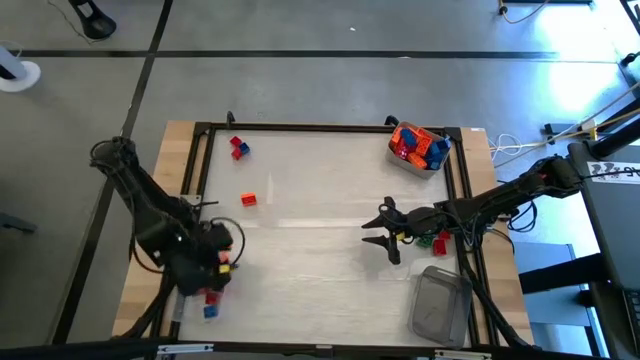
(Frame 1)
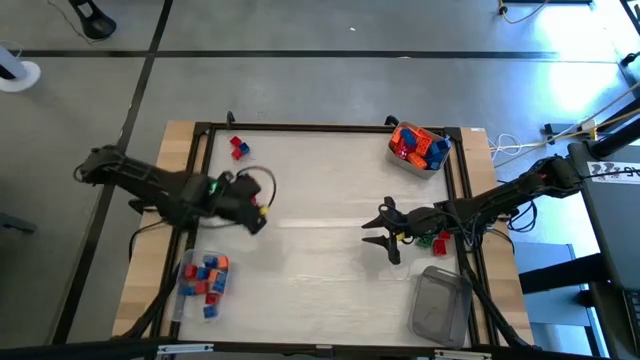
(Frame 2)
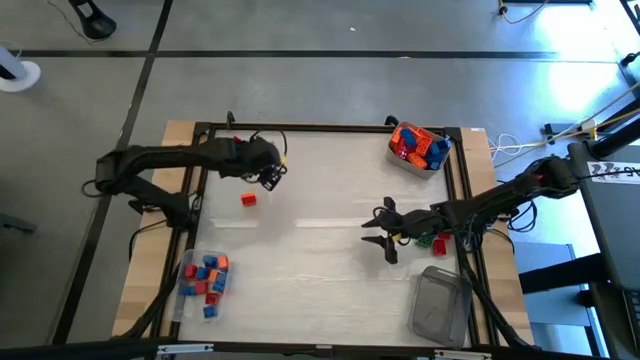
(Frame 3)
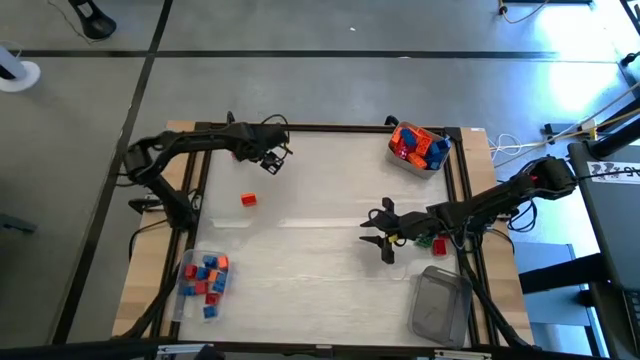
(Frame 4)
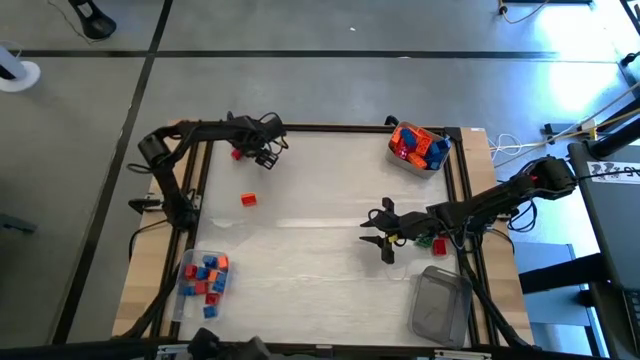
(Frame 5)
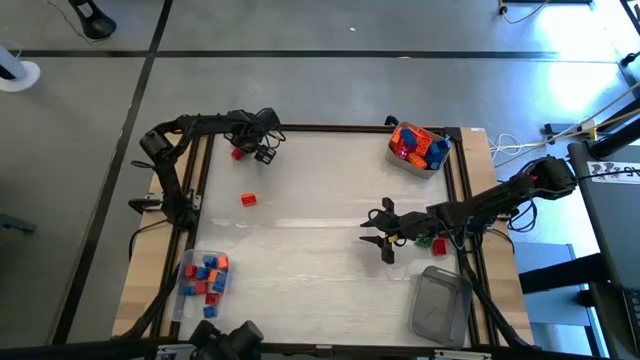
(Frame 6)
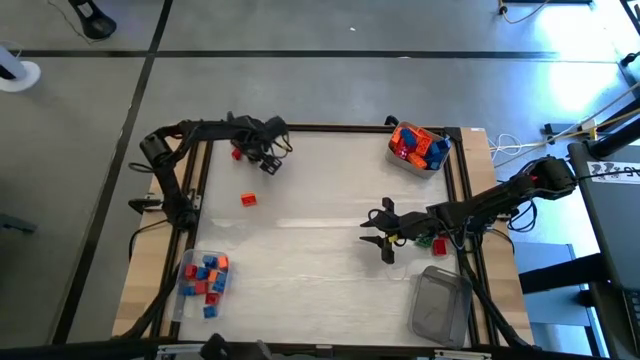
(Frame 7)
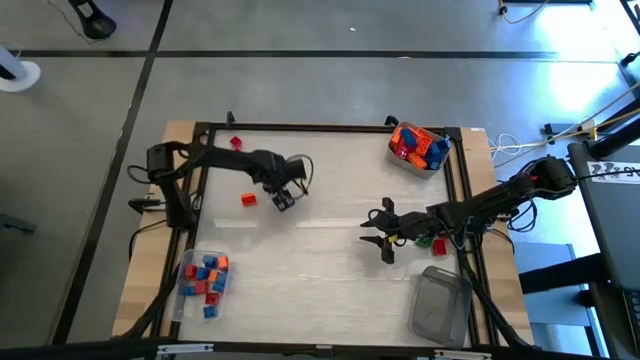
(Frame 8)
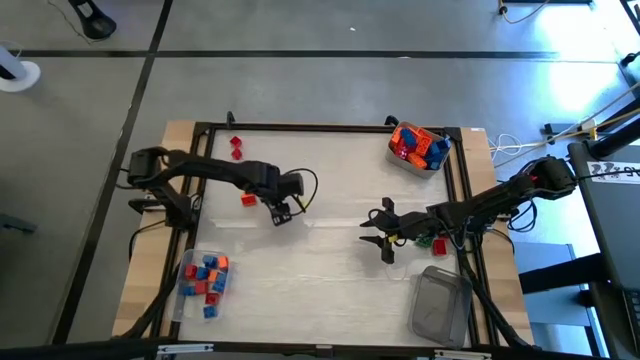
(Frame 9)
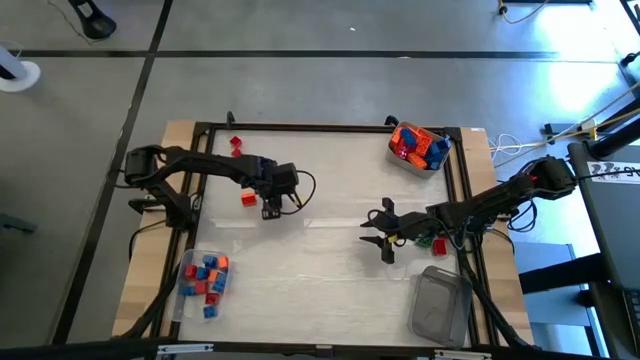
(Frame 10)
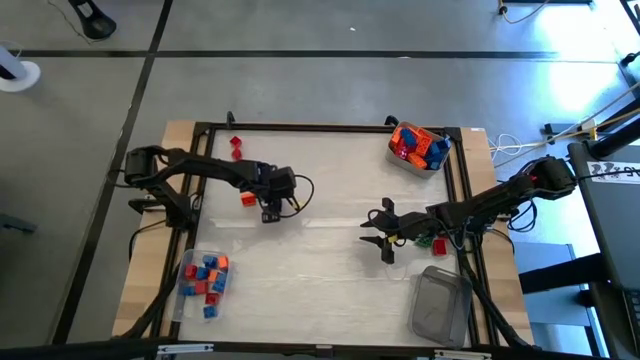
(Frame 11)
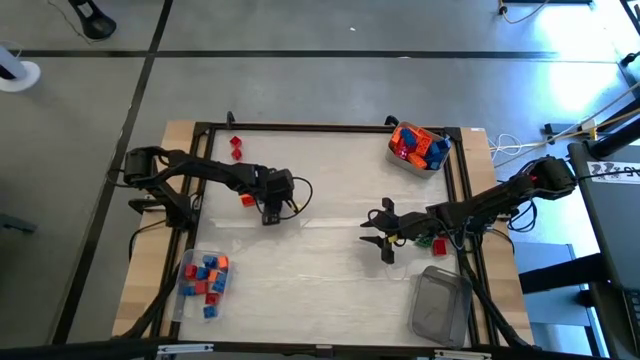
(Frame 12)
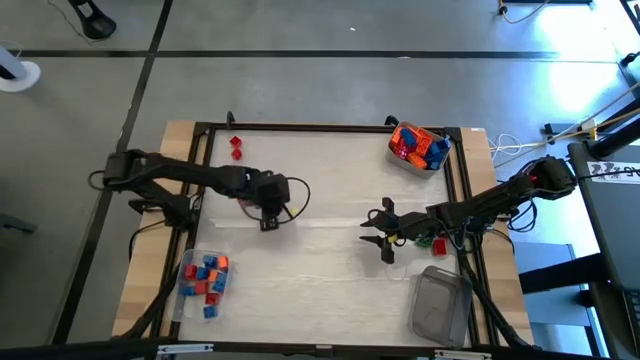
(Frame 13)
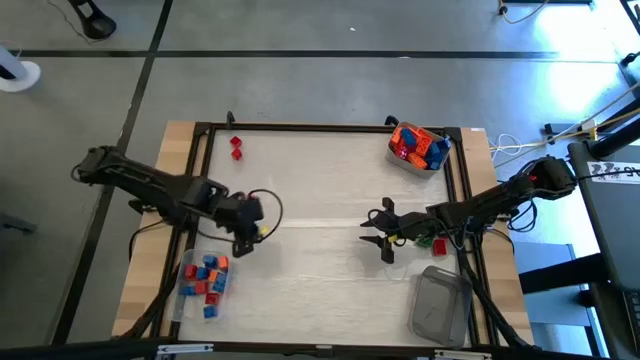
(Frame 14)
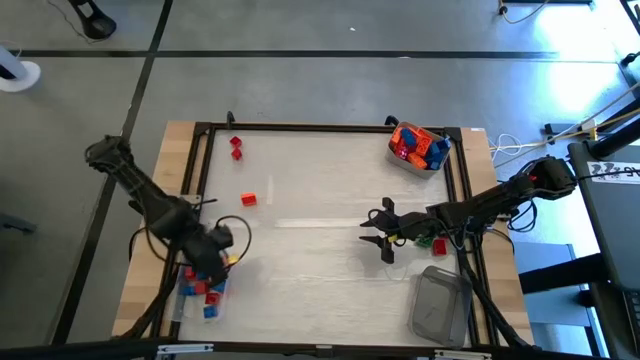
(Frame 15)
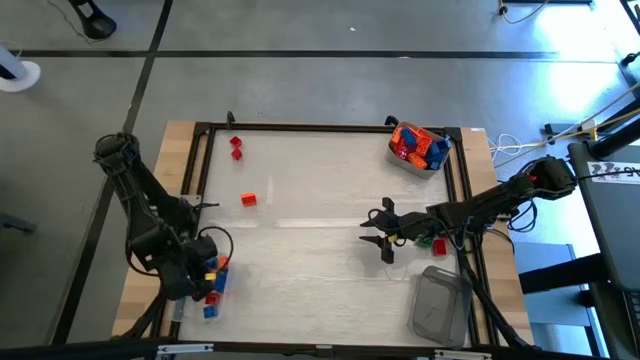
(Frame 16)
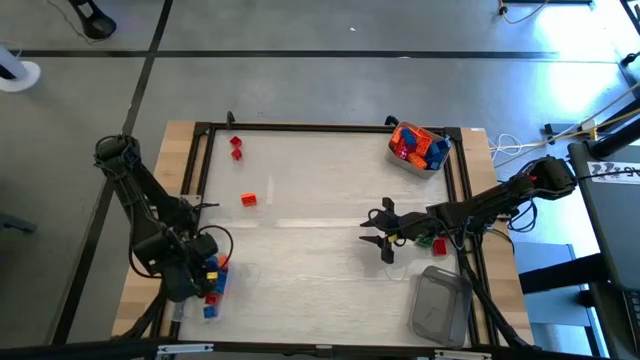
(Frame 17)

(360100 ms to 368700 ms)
Task: Sort blocks by size
Put the blue game piece into the transparent bin

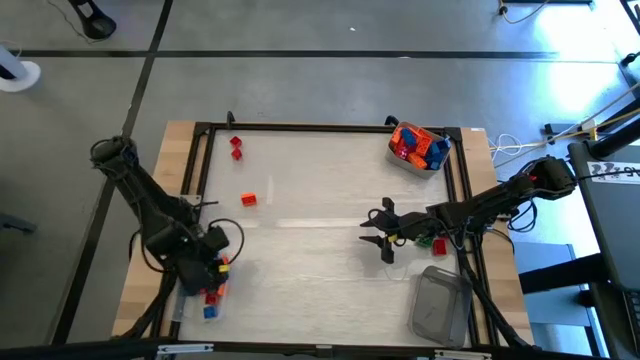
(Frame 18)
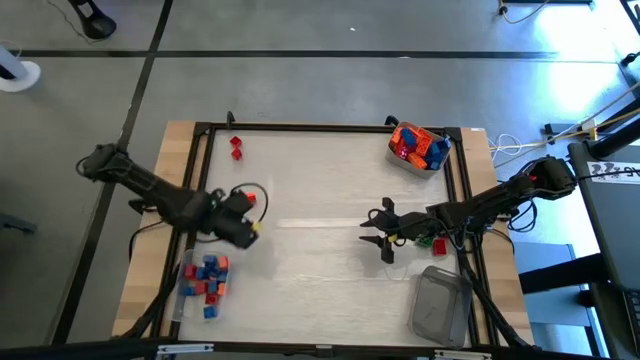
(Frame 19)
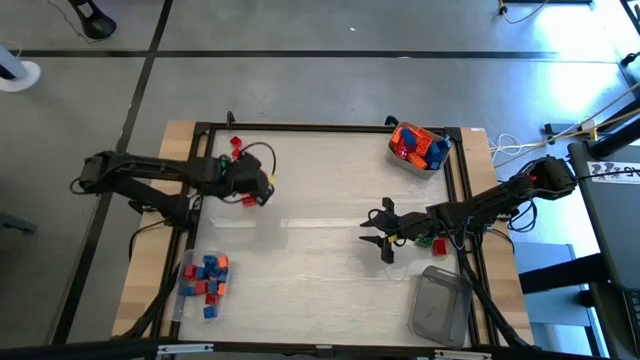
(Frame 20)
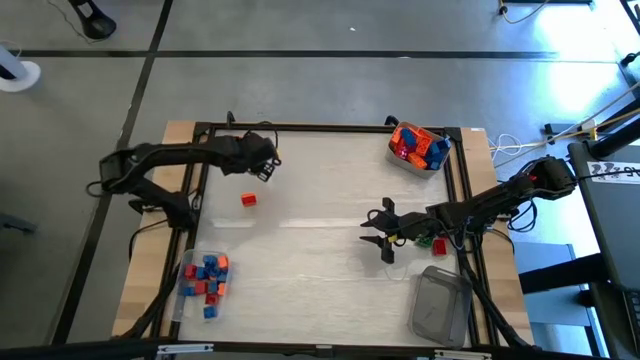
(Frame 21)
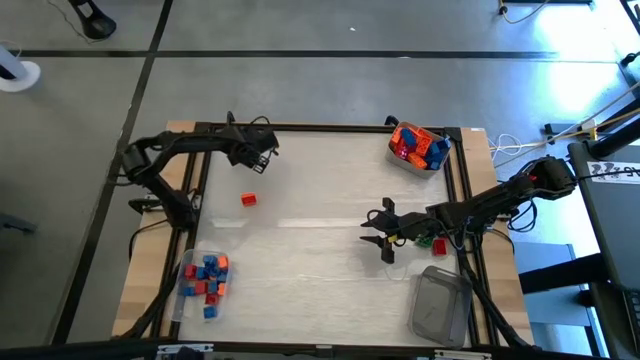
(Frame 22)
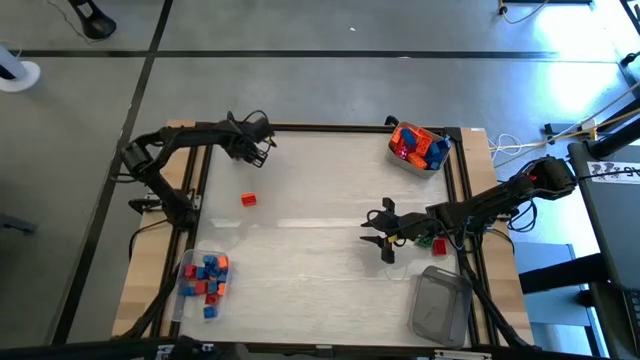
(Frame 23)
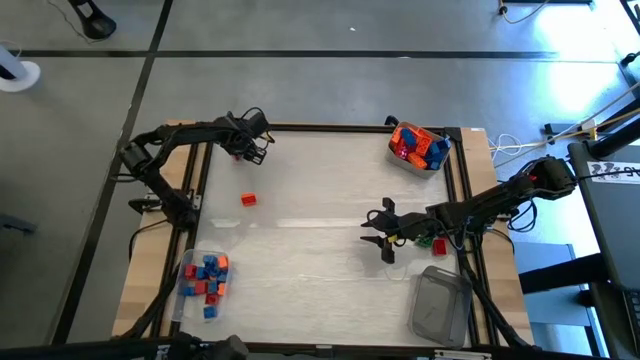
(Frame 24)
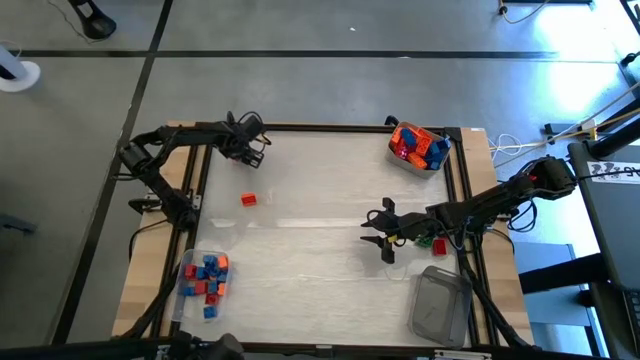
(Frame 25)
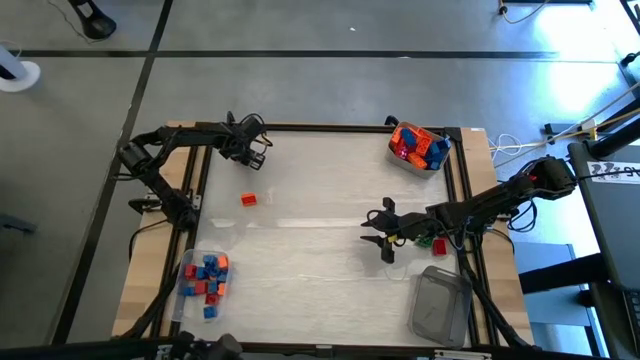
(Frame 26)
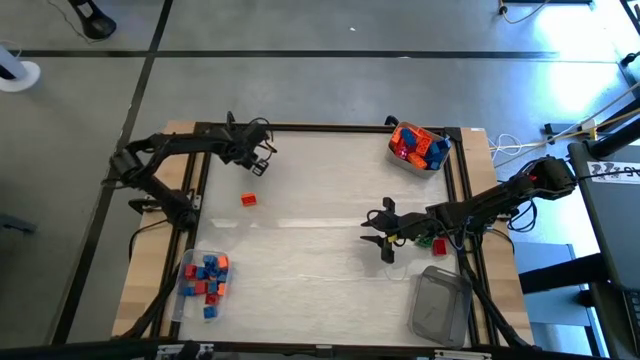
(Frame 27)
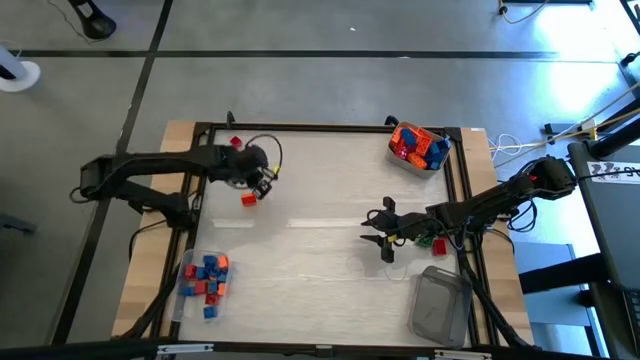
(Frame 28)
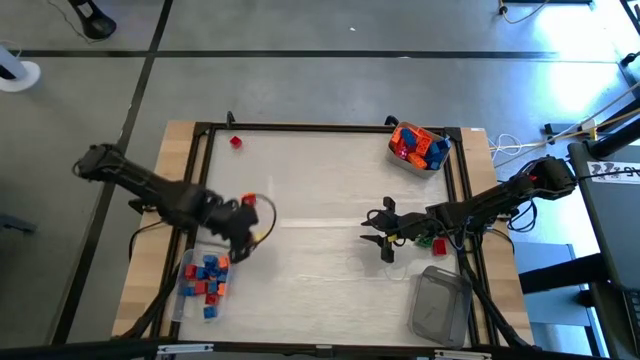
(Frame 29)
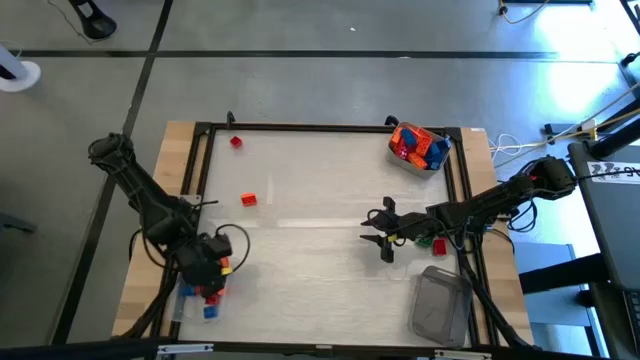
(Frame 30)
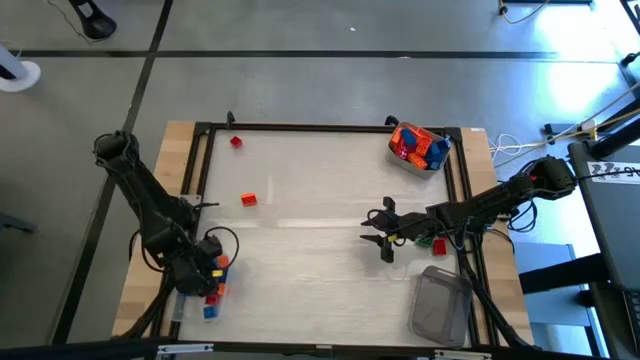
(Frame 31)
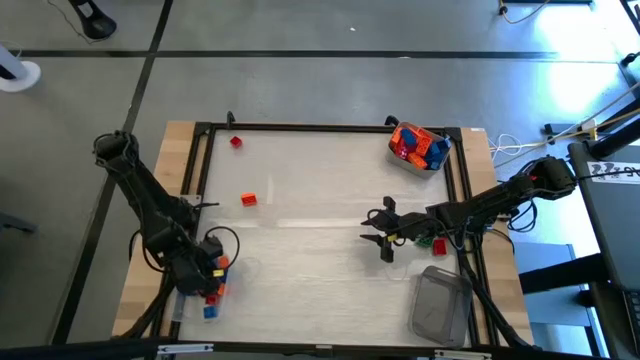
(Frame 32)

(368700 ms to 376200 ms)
Put the red game piece into the transparent bin

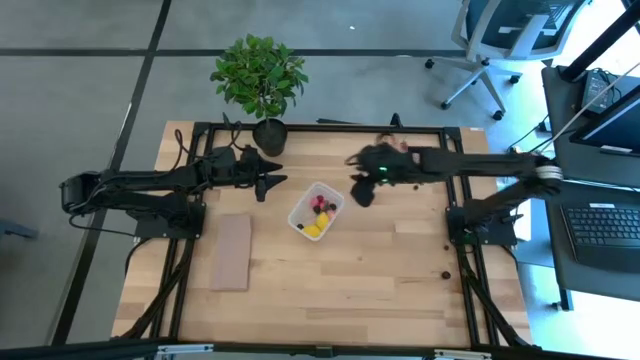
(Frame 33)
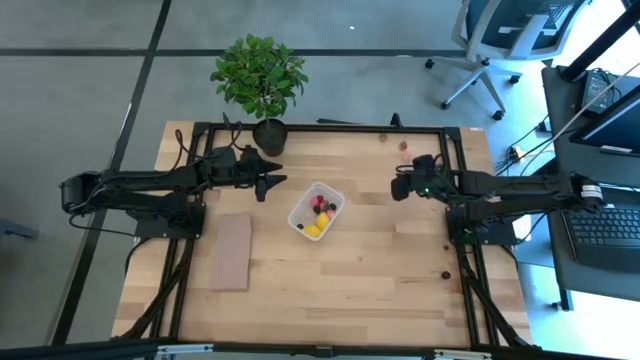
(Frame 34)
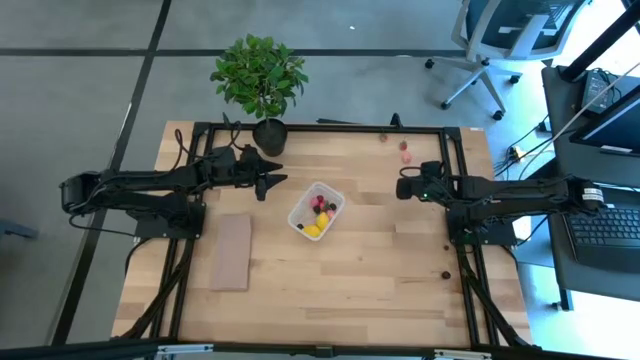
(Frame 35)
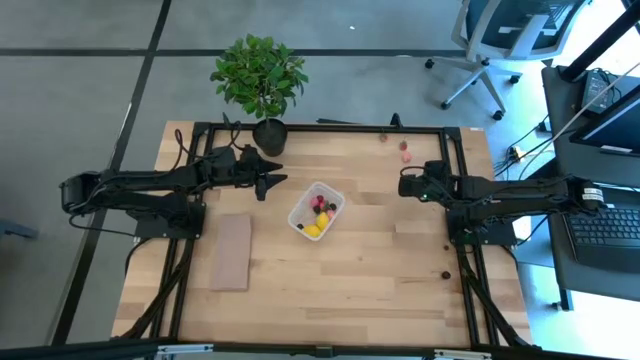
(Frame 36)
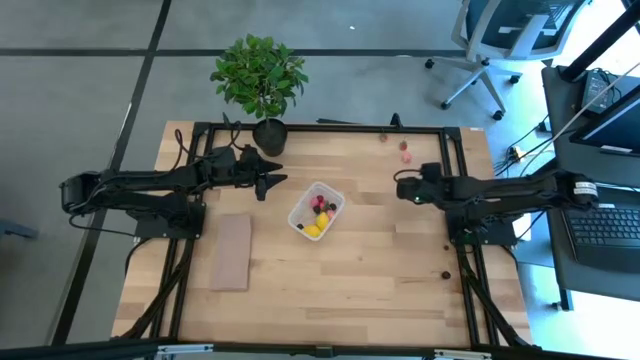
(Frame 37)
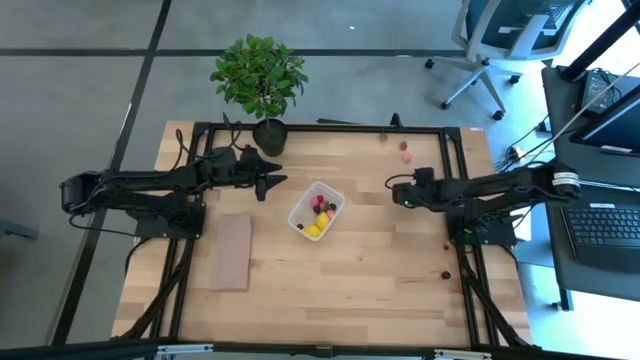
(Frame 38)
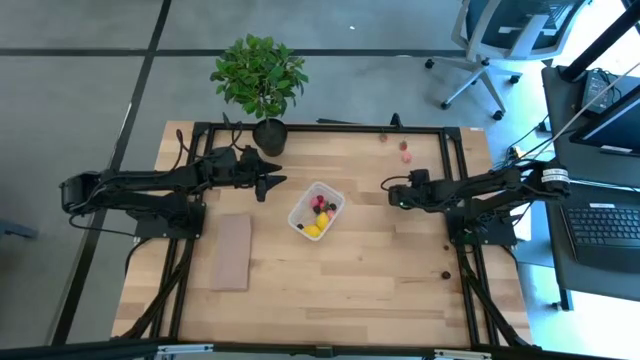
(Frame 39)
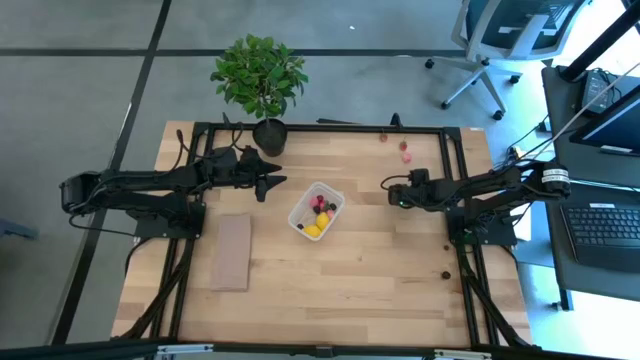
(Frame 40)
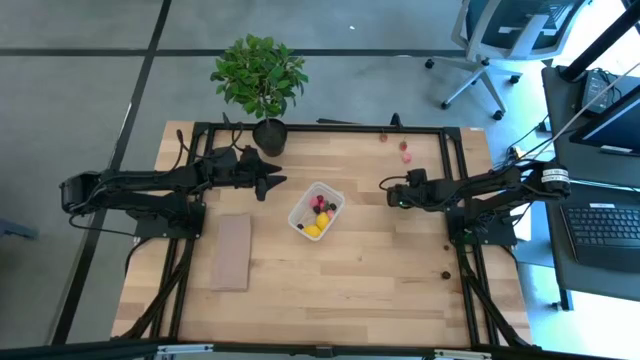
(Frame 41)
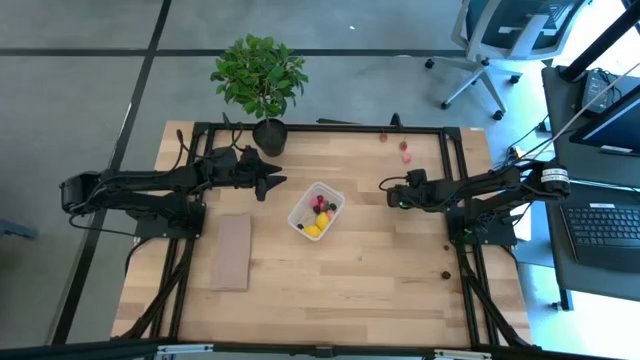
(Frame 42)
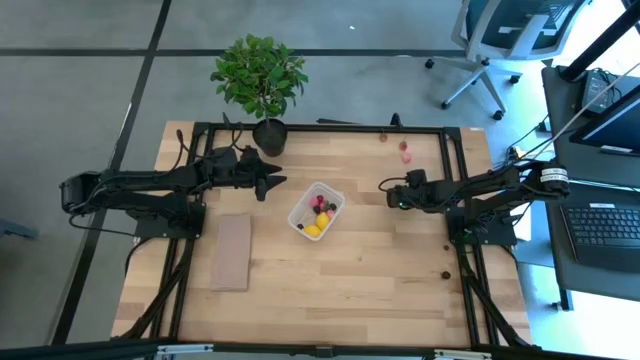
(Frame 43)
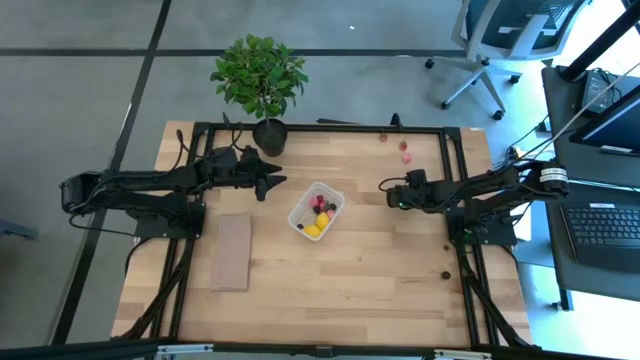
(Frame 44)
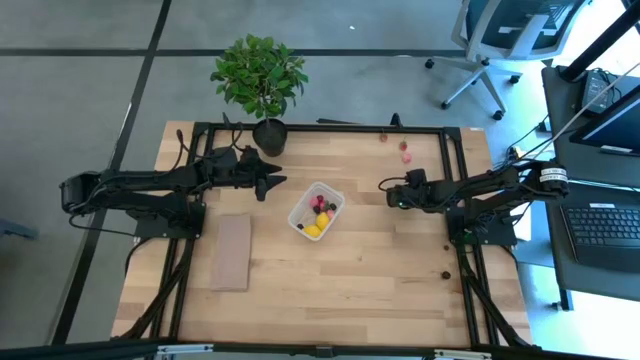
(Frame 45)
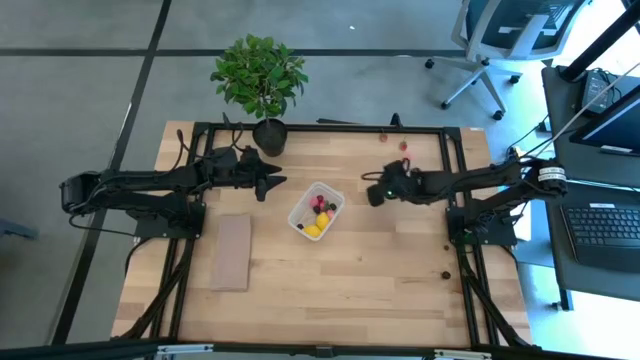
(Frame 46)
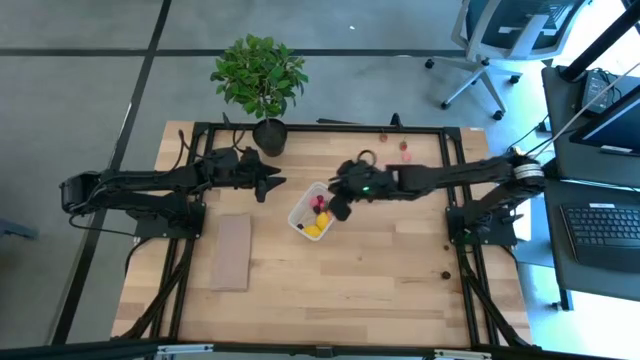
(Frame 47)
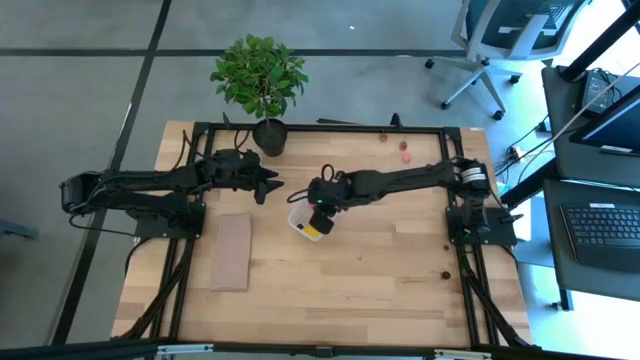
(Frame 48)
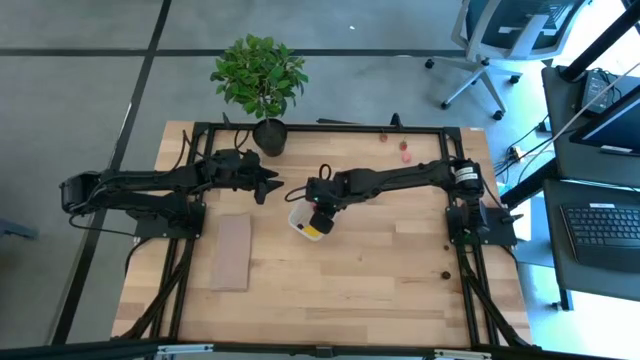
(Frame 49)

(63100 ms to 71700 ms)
Task: Pick and placing Produce into tupperware
Put the top blueberry into the transparent bin
